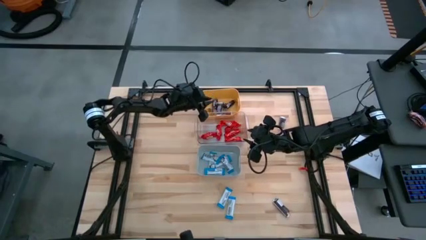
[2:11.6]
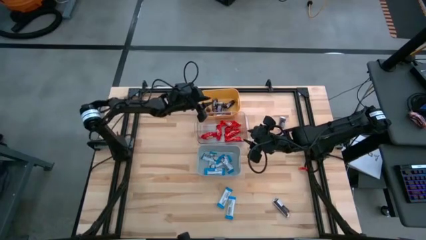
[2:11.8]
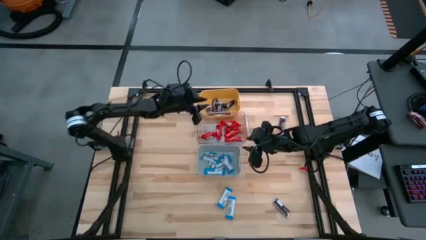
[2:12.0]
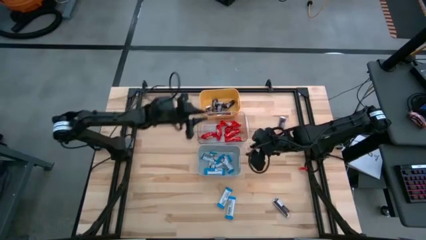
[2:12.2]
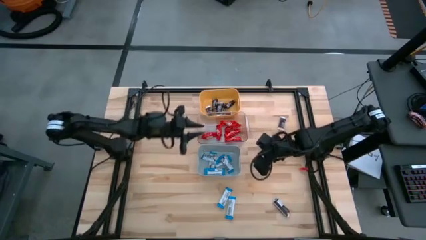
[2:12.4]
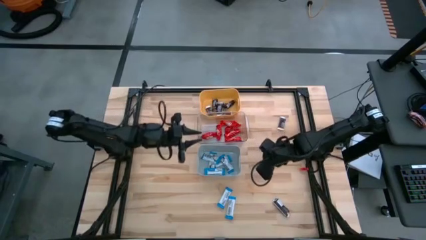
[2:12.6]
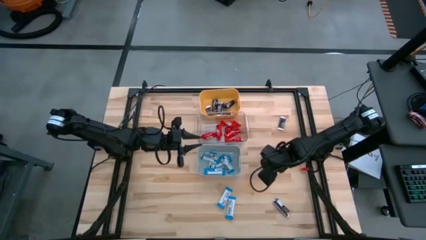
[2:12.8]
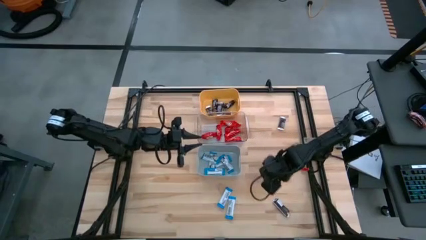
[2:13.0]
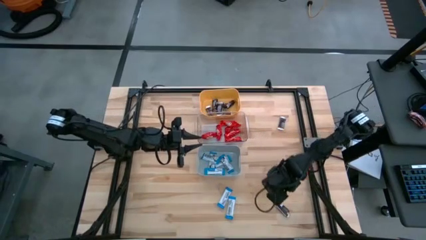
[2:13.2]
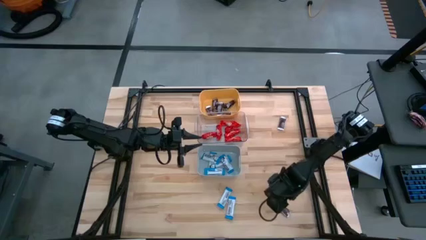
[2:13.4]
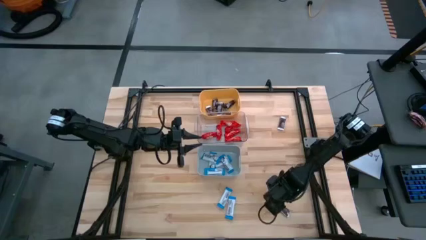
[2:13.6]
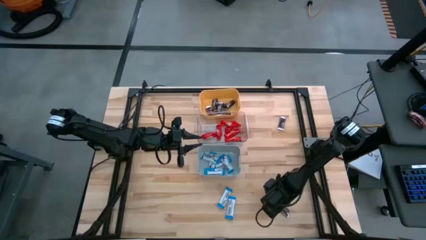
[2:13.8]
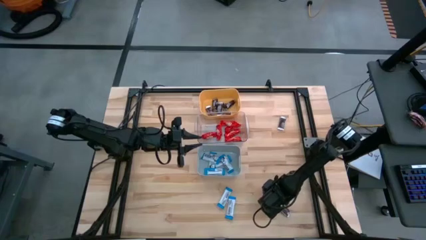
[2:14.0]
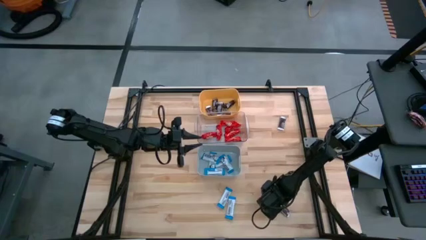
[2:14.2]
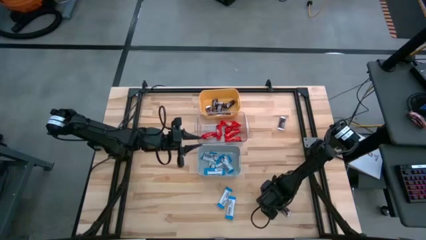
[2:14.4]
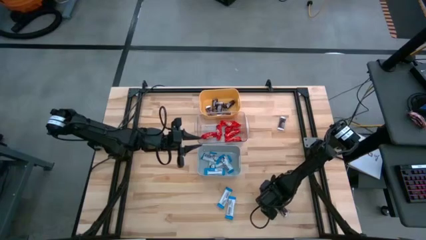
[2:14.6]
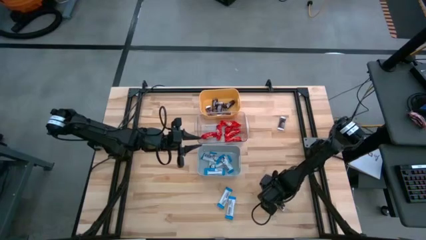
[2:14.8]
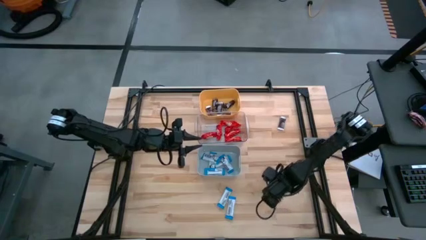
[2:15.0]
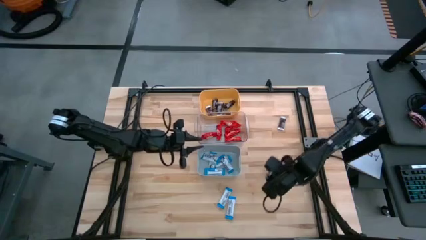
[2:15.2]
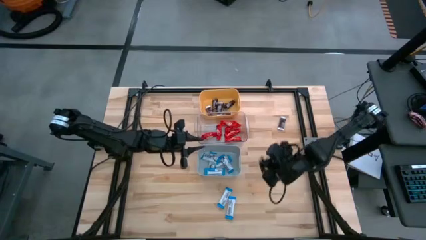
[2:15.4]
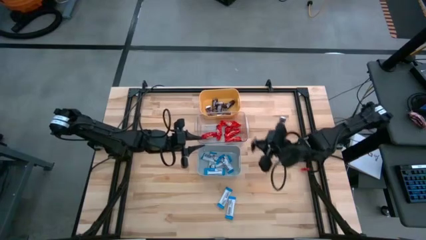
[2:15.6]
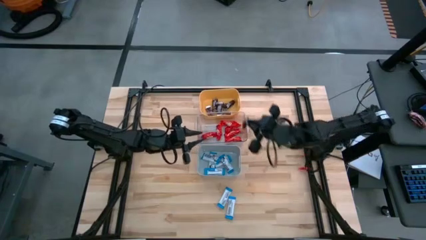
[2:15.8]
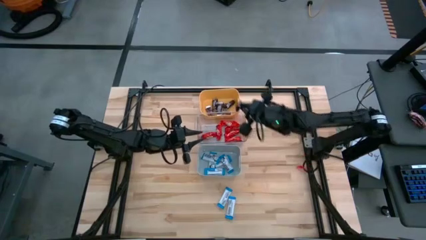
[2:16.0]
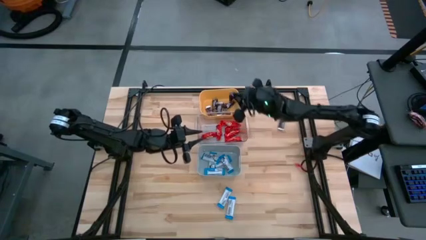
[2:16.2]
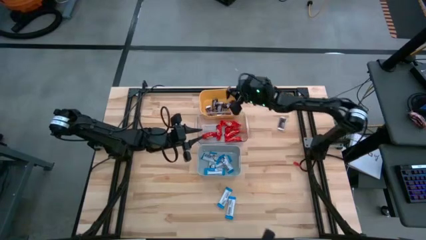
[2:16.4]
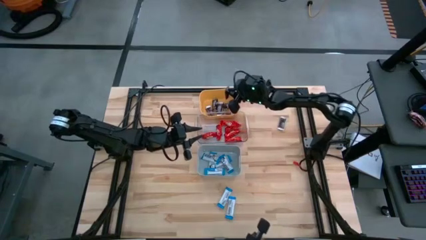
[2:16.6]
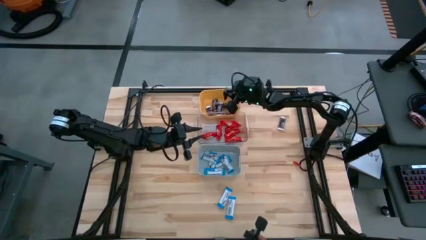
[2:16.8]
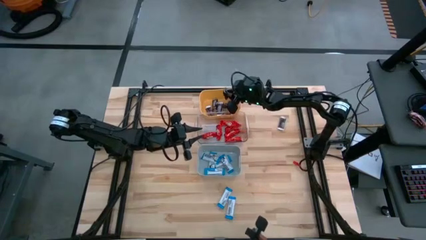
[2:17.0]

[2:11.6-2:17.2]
Task: Organize candy in baskets
Put the brown chocolate bar into the yellow bin

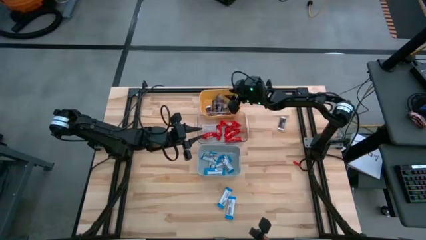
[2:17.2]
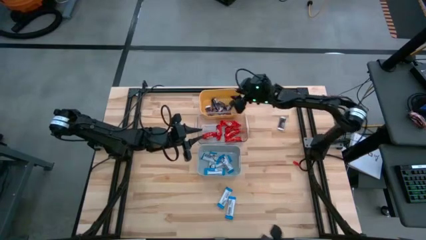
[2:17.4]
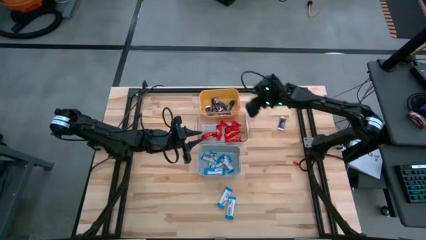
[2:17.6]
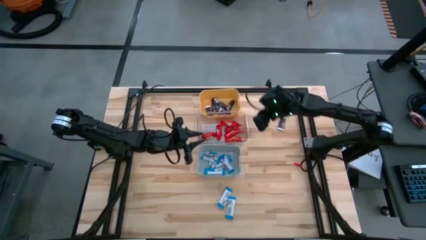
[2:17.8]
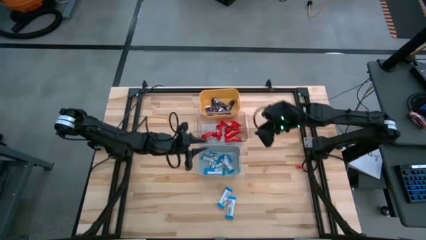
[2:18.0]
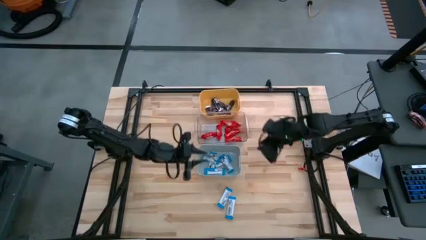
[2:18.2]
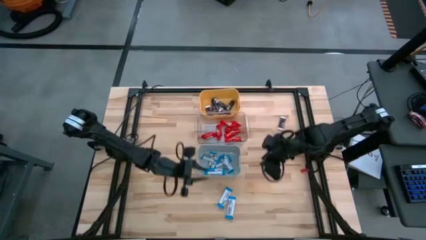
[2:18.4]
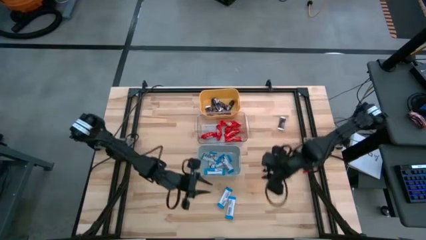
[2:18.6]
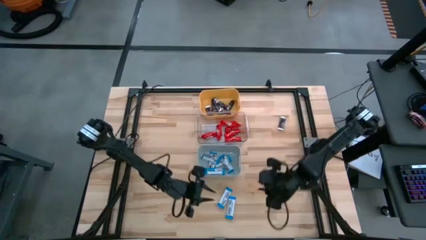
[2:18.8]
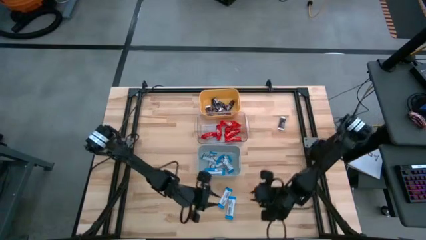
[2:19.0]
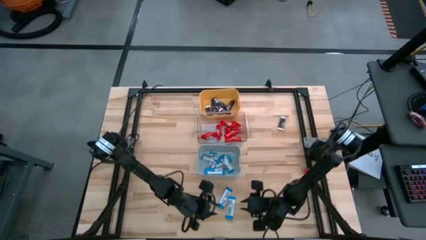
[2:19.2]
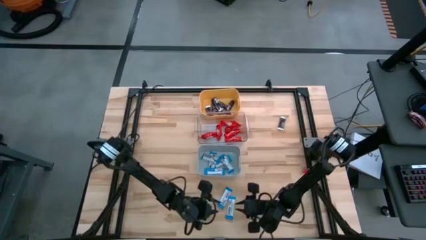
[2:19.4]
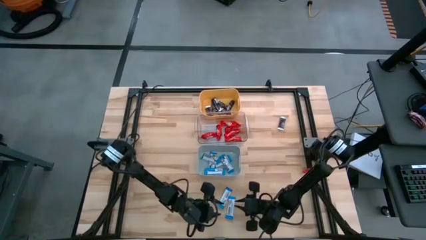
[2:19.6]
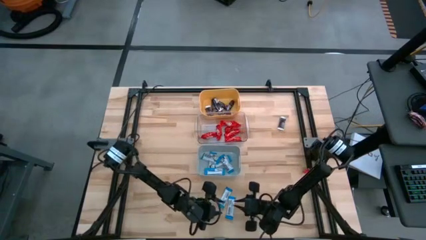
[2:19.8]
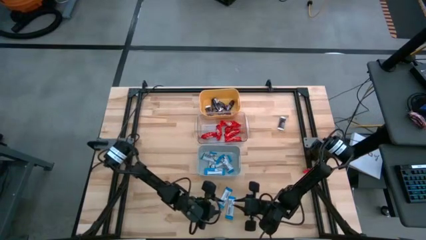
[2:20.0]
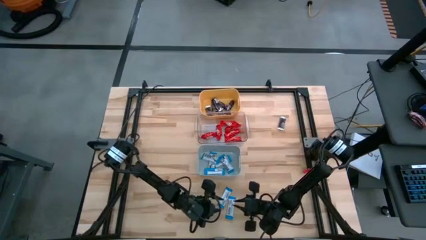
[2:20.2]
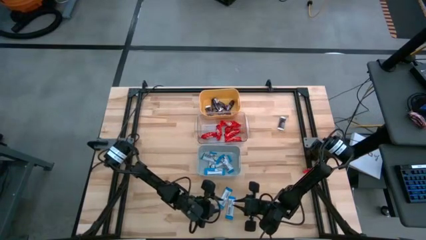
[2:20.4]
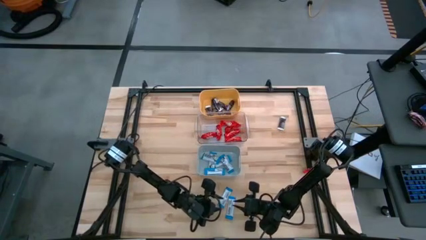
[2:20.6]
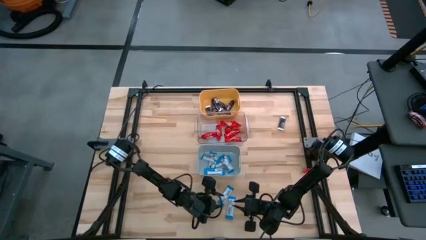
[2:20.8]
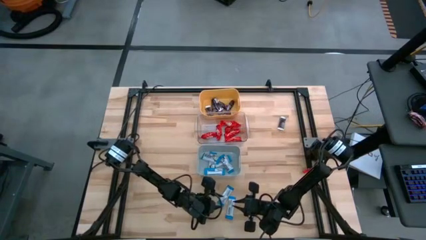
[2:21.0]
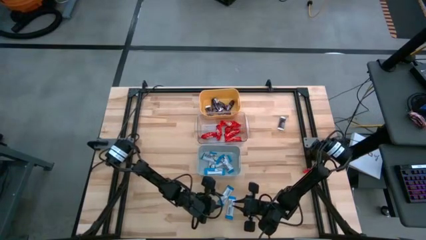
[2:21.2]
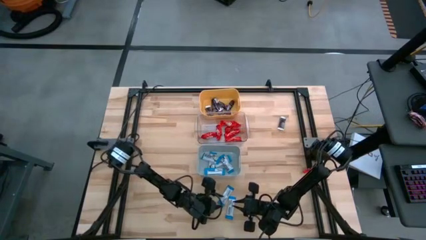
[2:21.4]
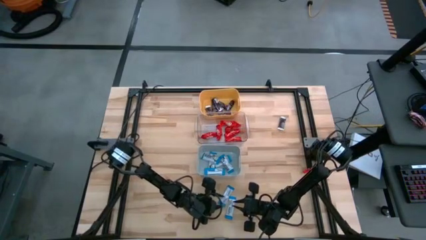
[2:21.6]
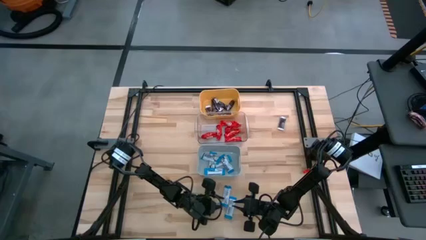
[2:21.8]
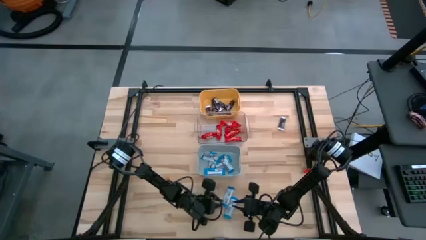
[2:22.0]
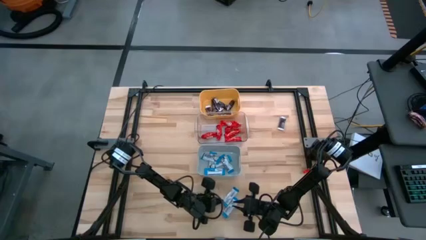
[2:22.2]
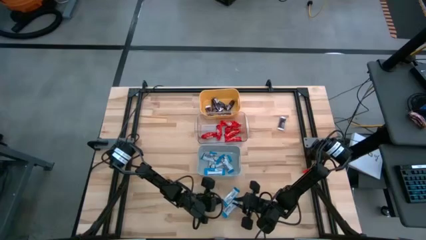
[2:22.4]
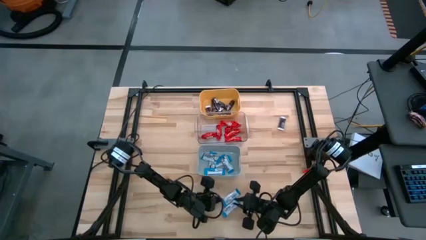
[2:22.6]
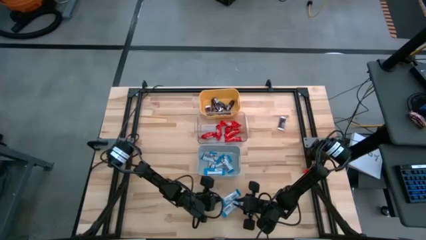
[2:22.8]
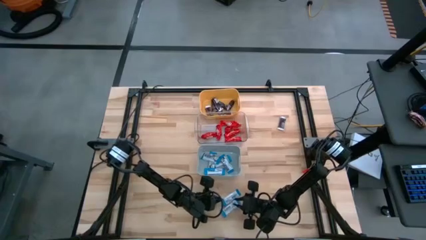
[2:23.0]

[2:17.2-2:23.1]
Put the white chocolate bar into the gray bin

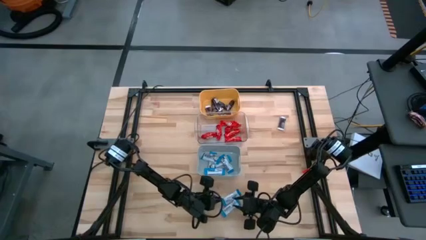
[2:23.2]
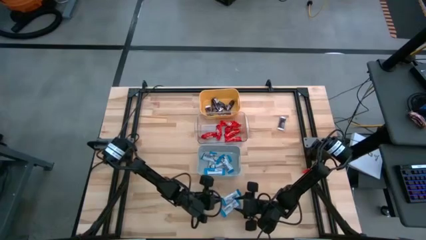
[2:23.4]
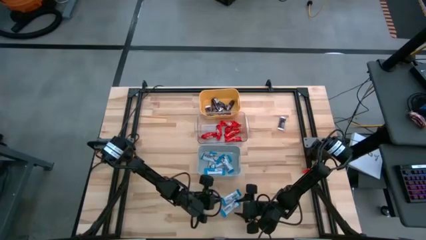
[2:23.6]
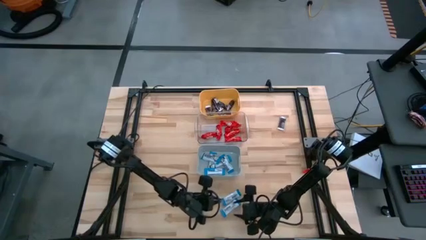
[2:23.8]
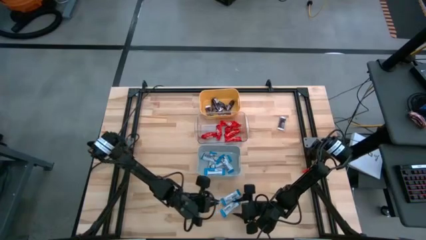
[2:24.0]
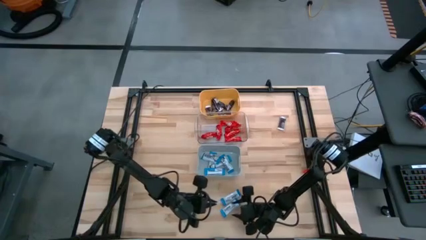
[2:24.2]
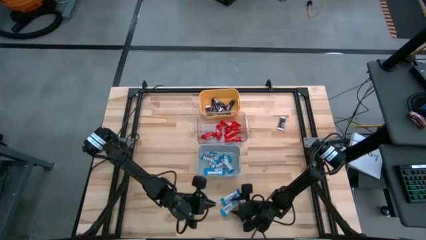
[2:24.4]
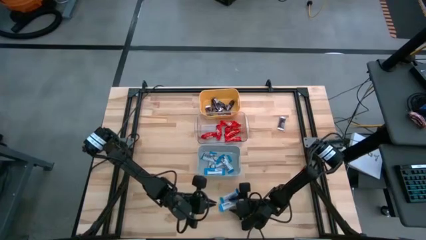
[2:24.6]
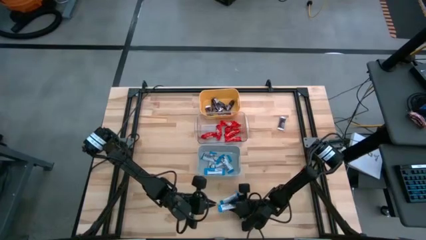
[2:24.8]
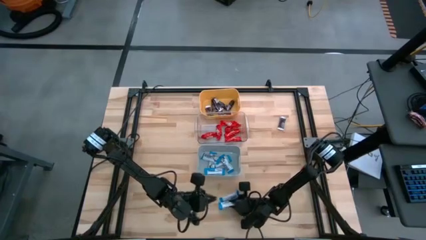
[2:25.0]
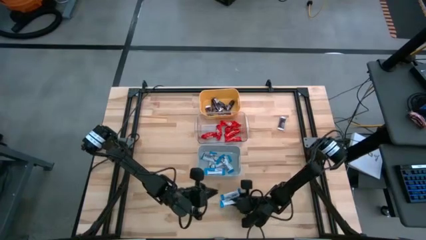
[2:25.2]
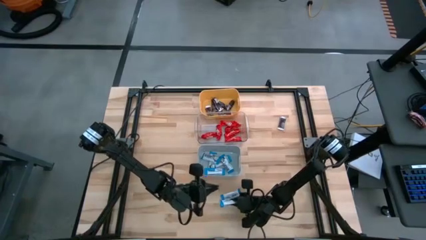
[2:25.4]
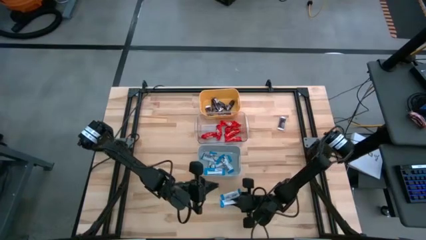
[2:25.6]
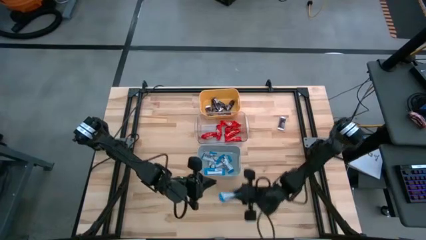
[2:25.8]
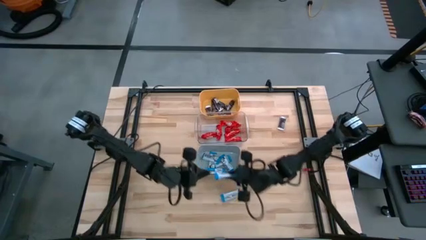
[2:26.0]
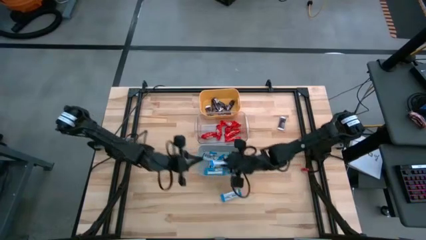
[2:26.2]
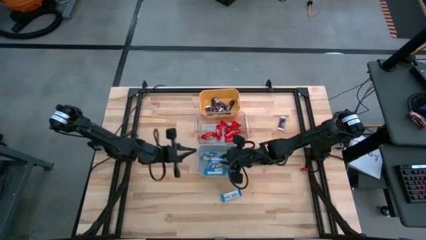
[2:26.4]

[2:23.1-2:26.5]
Put the white chocolate bar into the gray bin

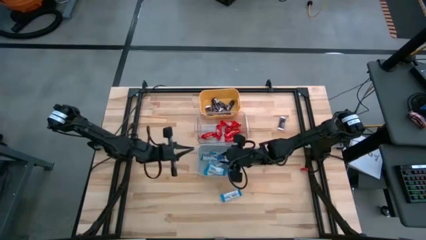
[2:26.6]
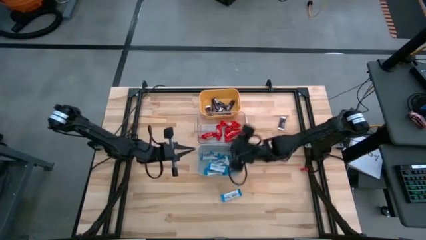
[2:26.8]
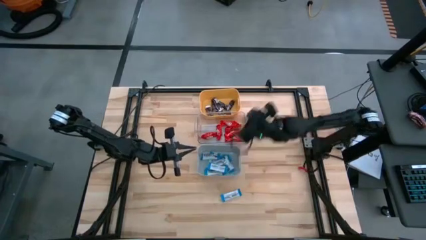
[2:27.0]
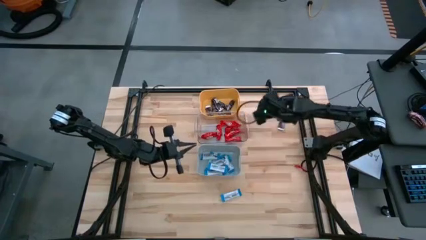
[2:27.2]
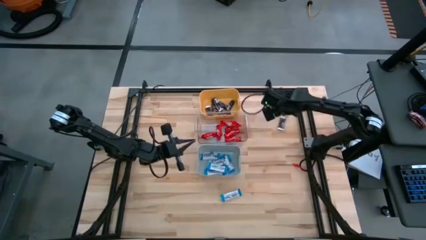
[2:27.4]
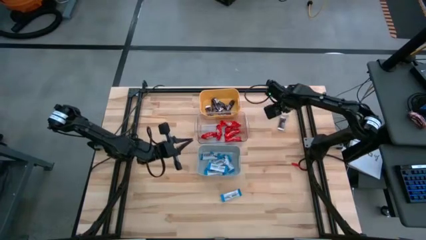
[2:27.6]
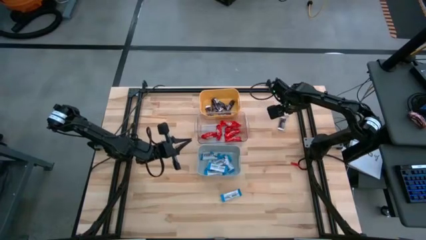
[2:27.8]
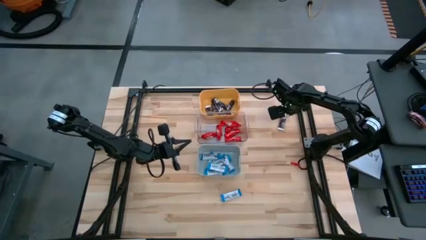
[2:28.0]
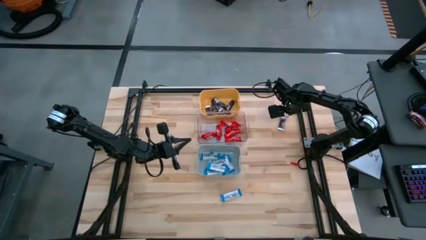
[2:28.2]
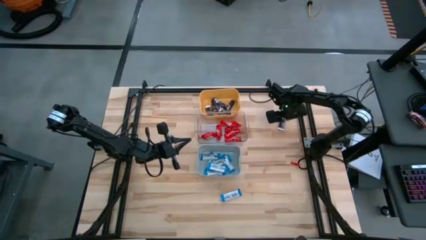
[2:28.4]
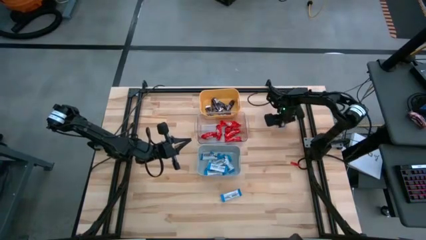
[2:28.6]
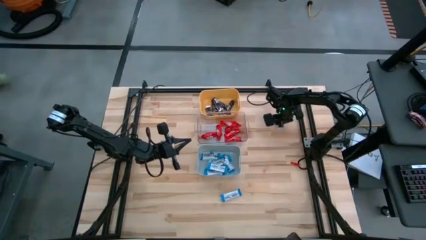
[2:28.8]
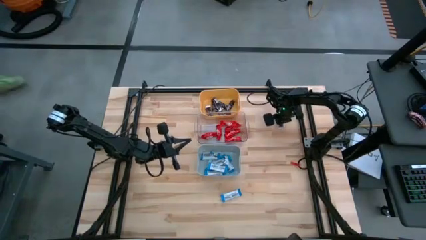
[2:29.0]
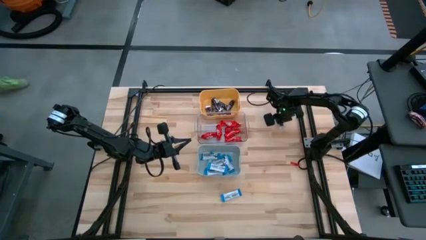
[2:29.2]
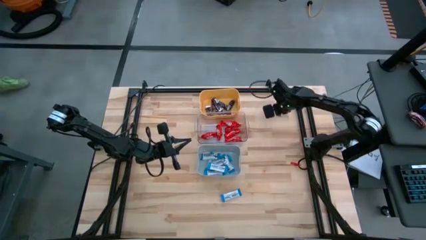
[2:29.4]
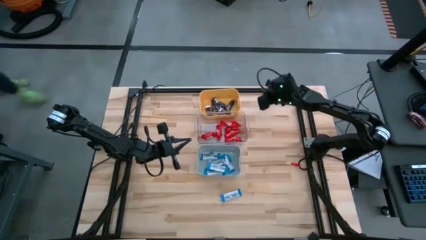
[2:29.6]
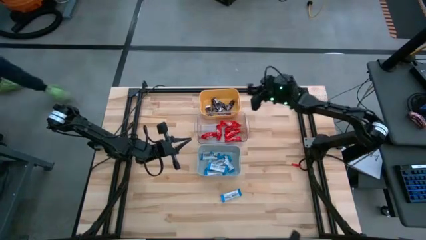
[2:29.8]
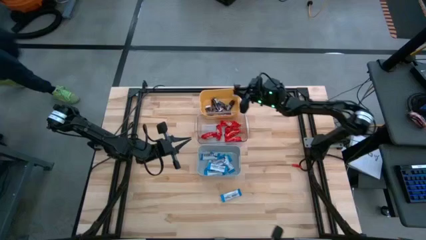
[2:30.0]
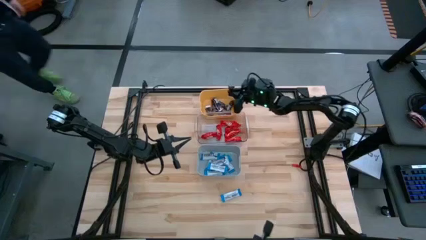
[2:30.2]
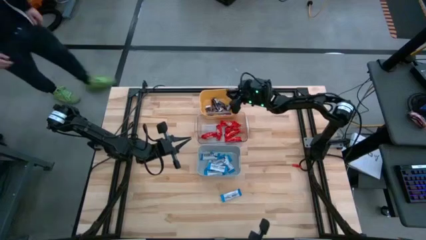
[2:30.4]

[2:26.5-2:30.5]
Put the brown chocolate bar into the yellow bin
